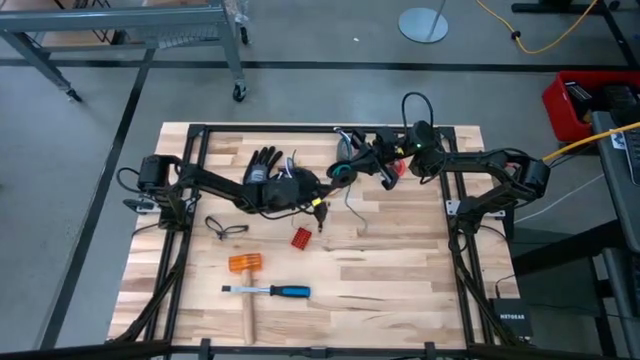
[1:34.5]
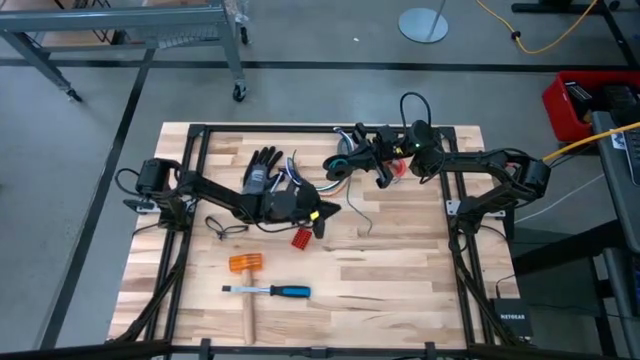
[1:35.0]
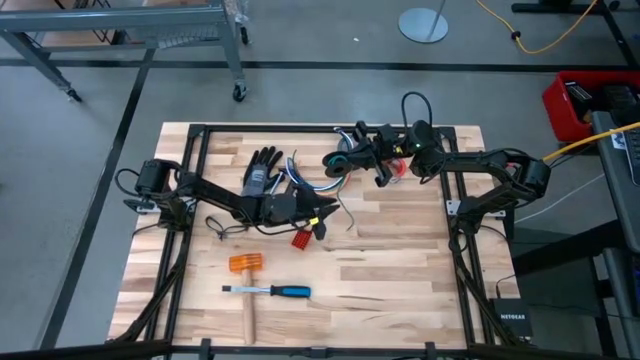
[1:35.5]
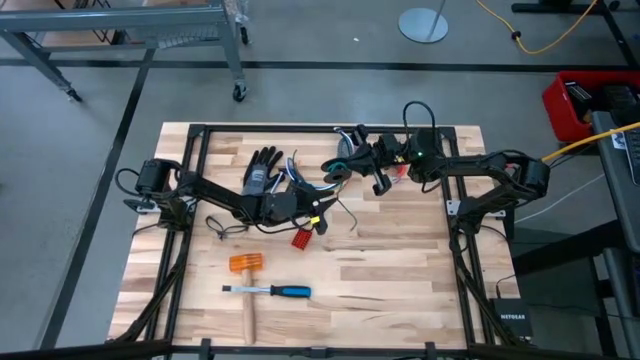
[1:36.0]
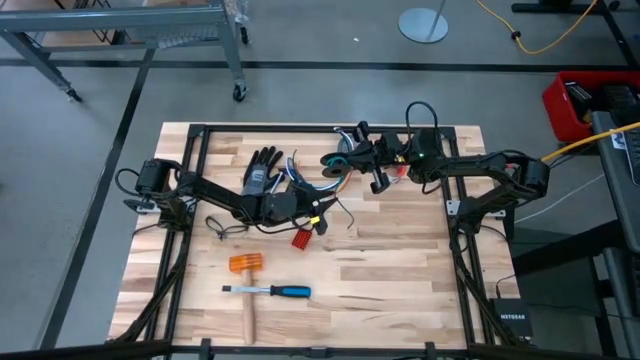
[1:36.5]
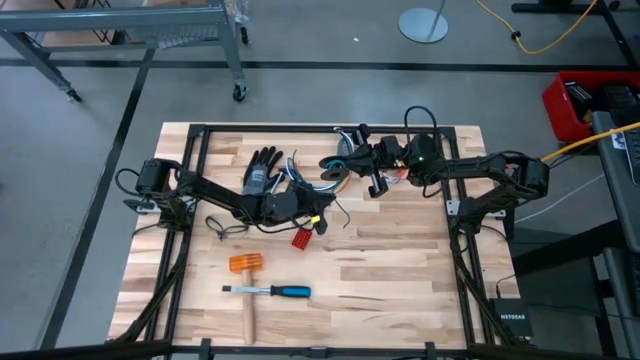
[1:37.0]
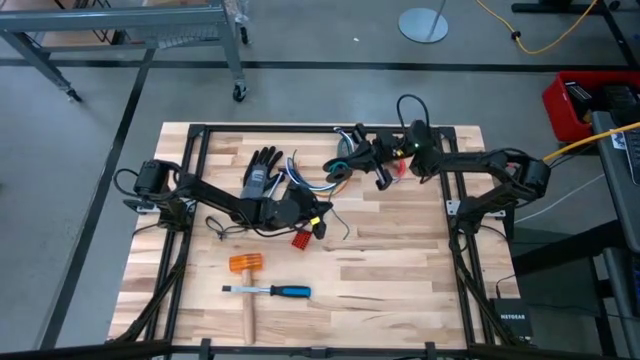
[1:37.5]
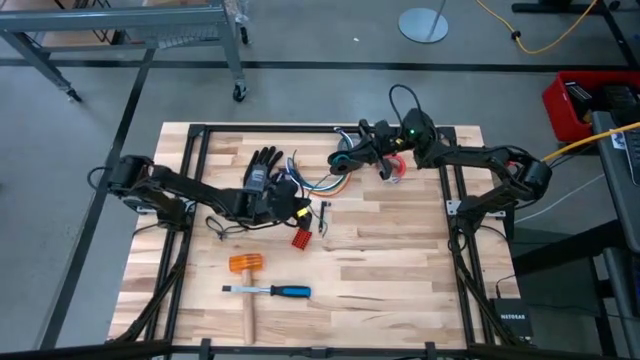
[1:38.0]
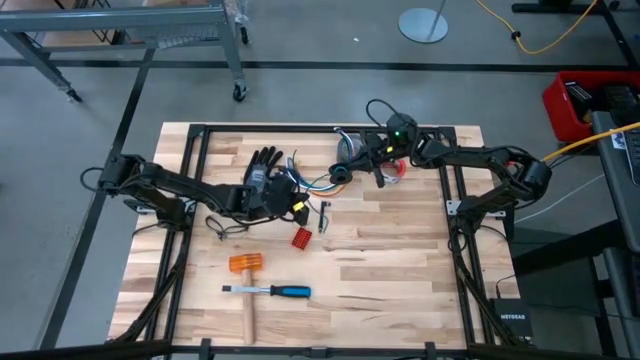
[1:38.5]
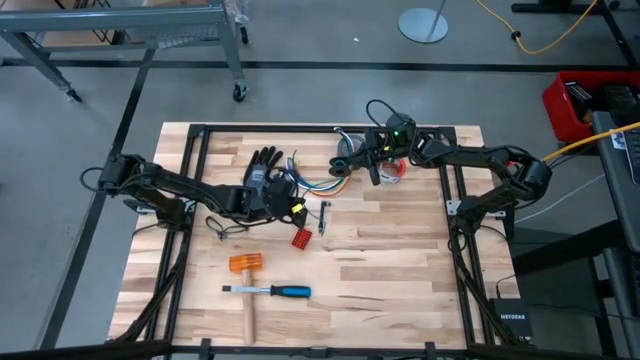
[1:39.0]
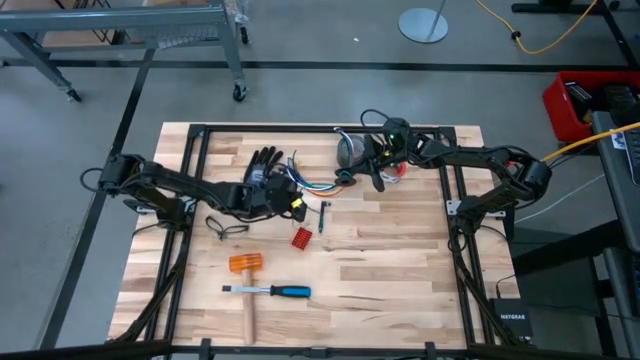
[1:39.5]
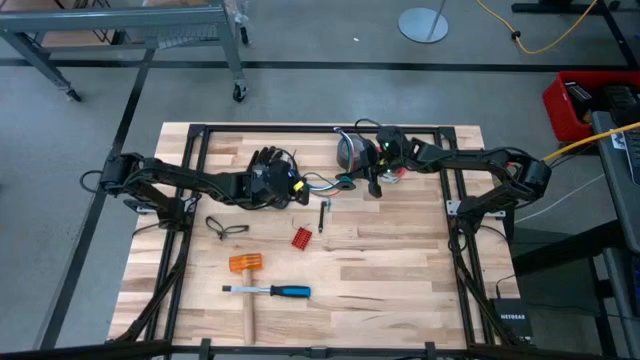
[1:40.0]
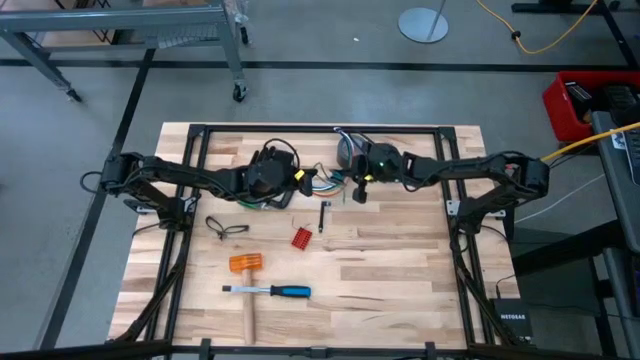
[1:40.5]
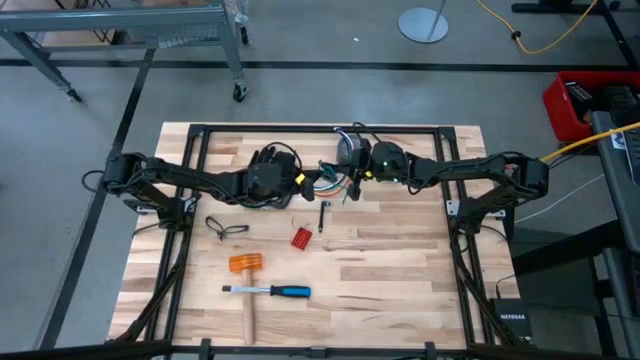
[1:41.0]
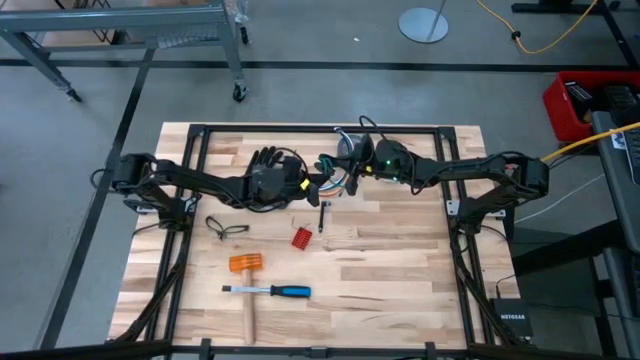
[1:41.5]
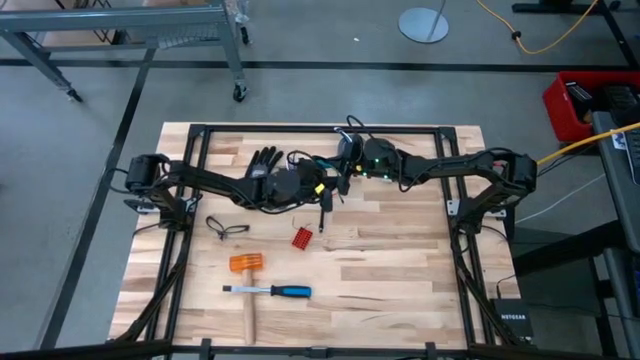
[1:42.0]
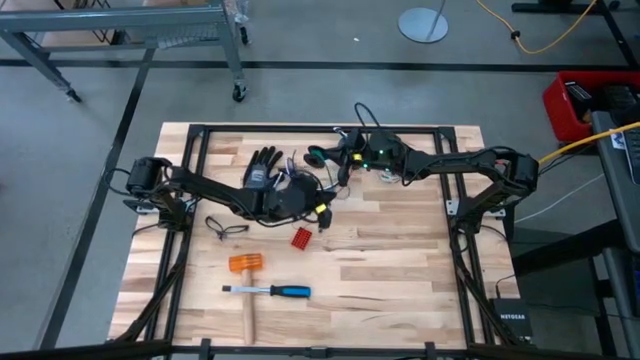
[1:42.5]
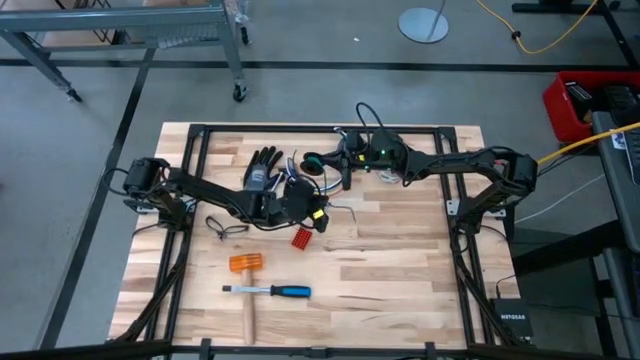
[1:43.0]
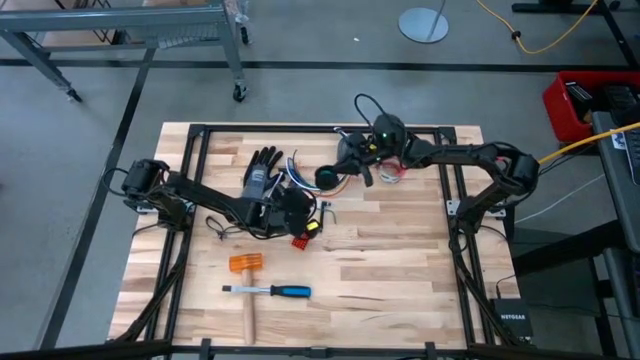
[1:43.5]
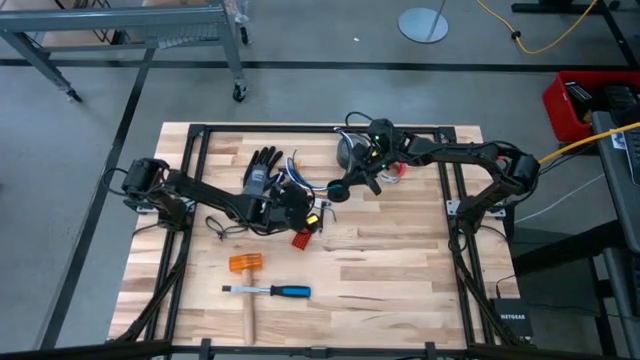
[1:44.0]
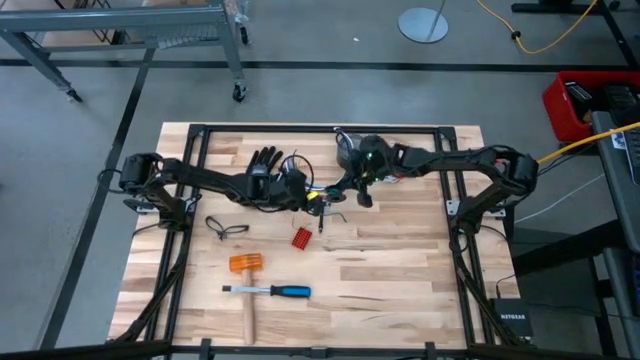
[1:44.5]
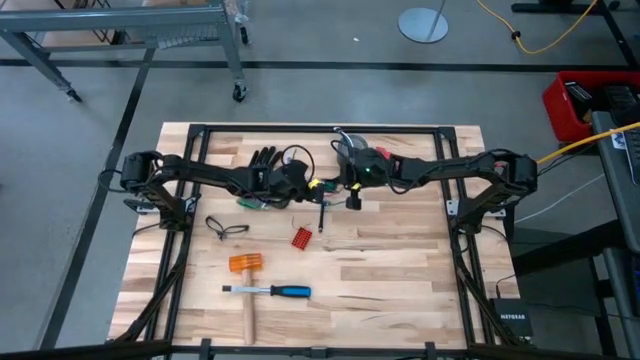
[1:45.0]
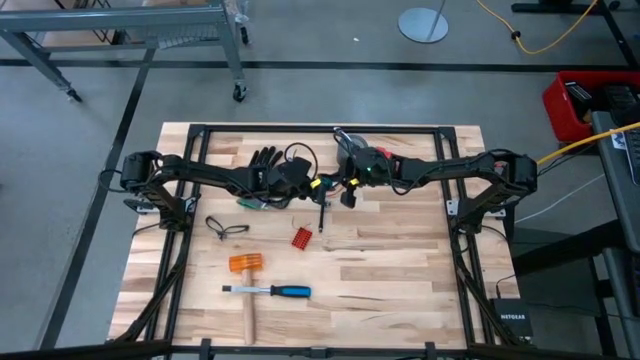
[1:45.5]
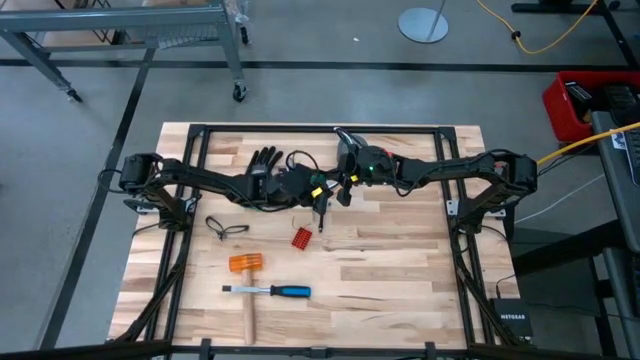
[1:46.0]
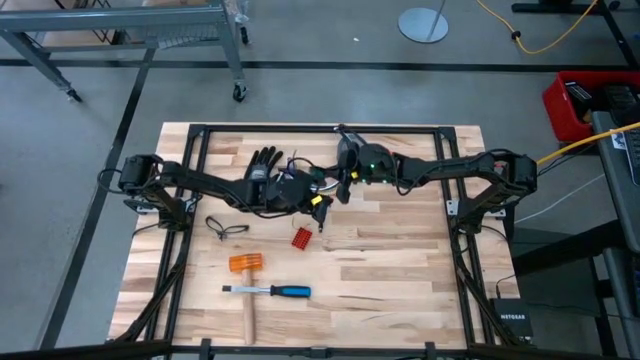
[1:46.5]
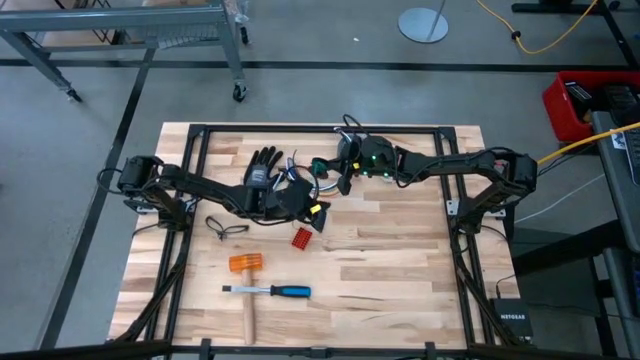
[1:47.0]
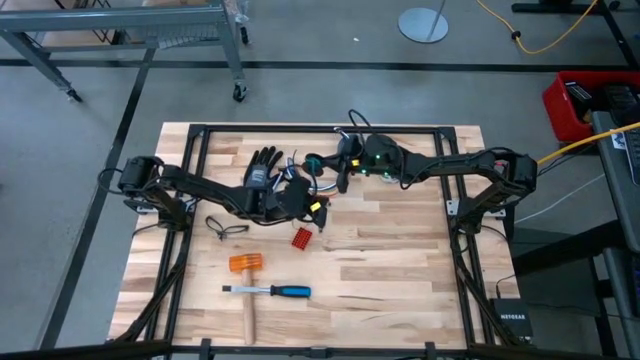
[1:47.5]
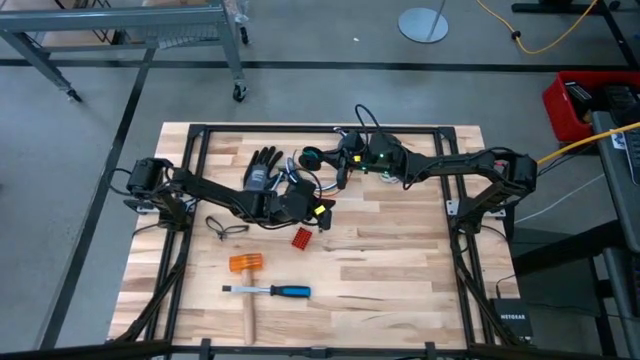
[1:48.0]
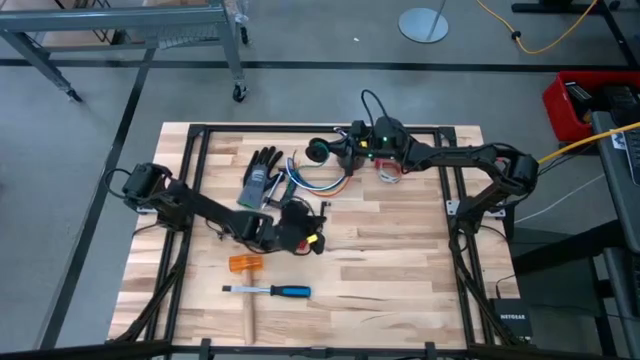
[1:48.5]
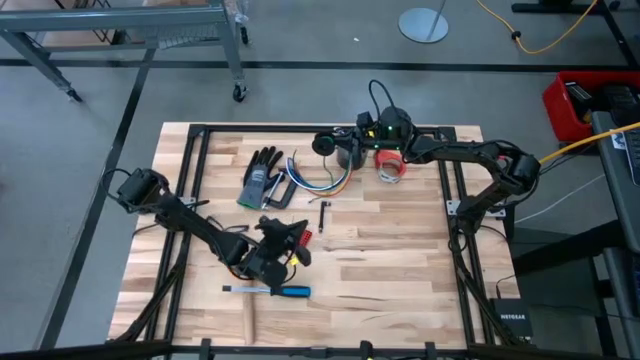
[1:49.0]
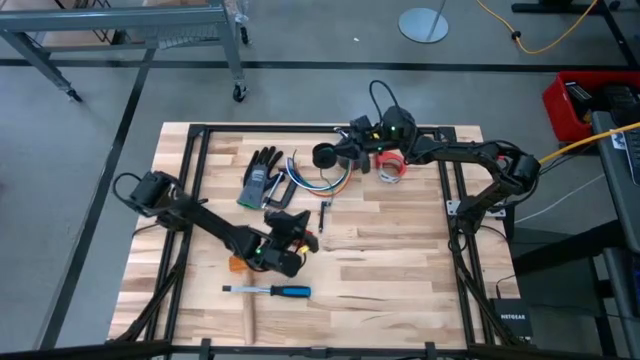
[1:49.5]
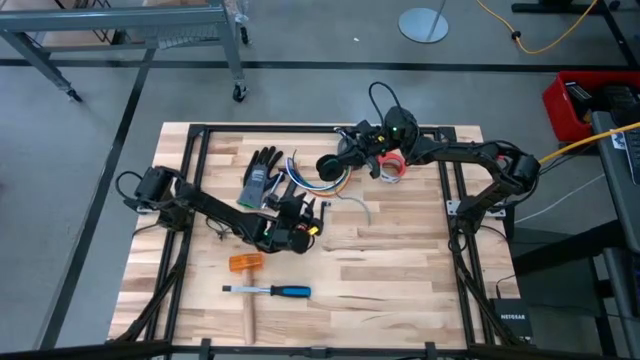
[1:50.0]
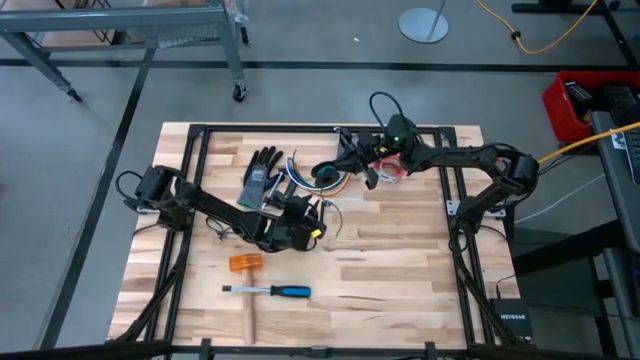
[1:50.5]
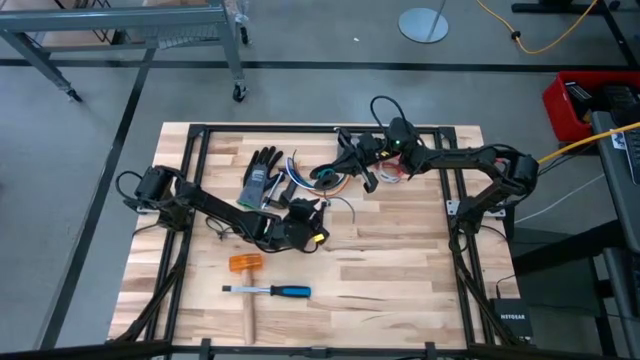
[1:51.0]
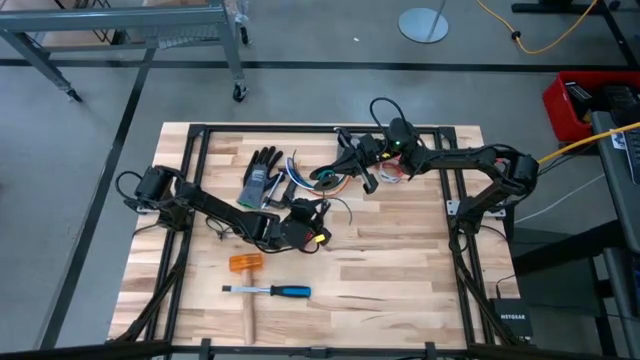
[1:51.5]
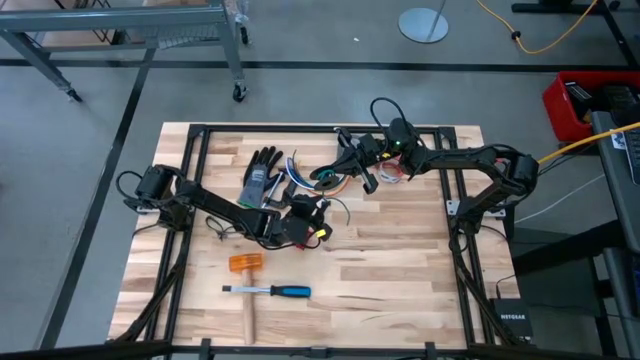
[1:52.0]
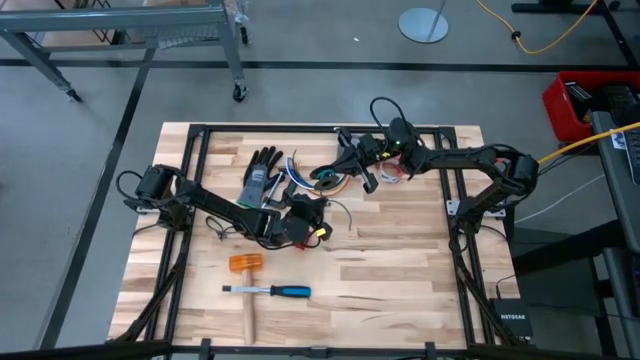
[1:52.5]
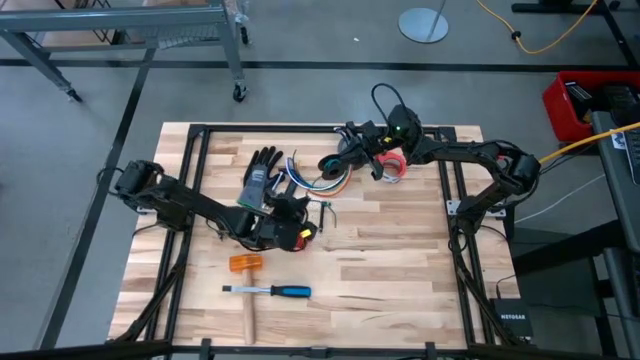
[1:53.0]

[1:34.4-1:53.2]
Task: Coil cords
Coil the green wire into the black spool

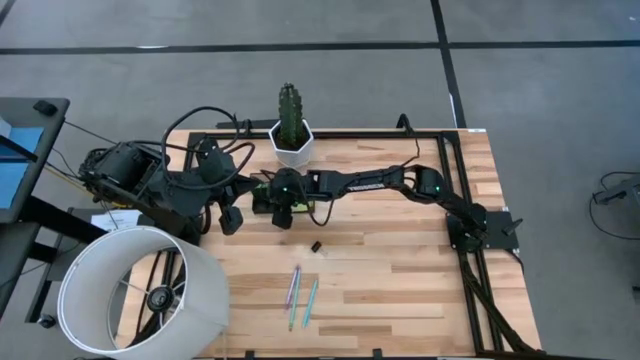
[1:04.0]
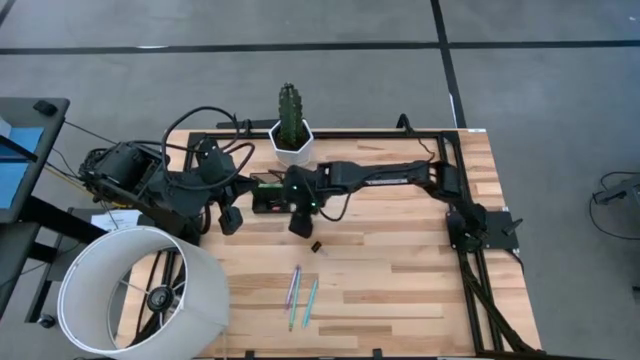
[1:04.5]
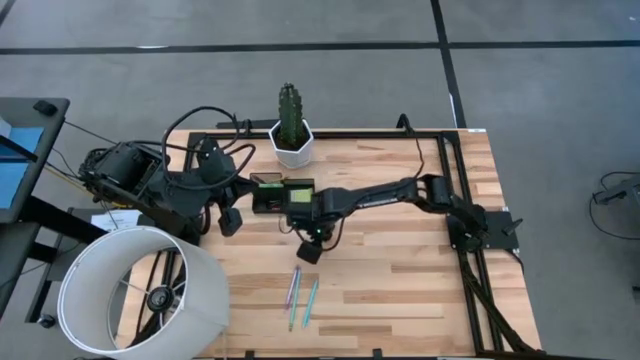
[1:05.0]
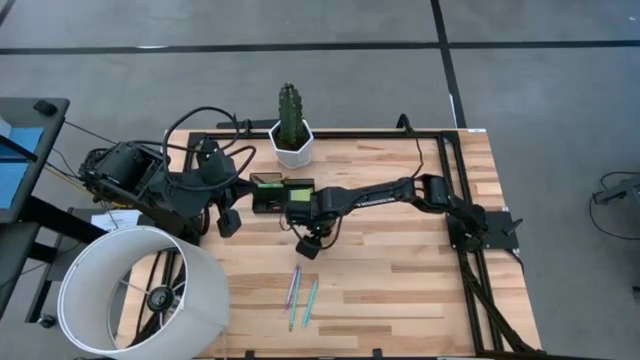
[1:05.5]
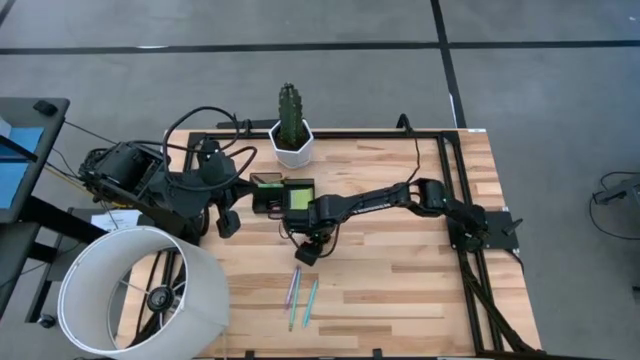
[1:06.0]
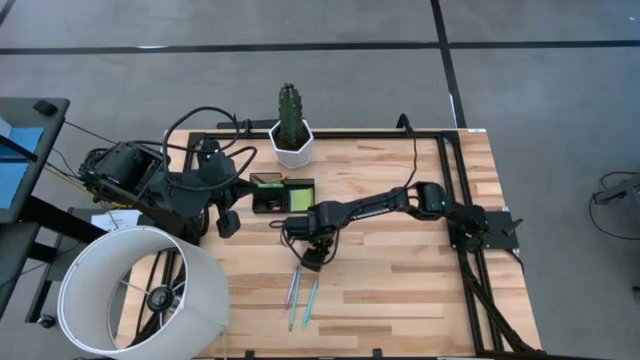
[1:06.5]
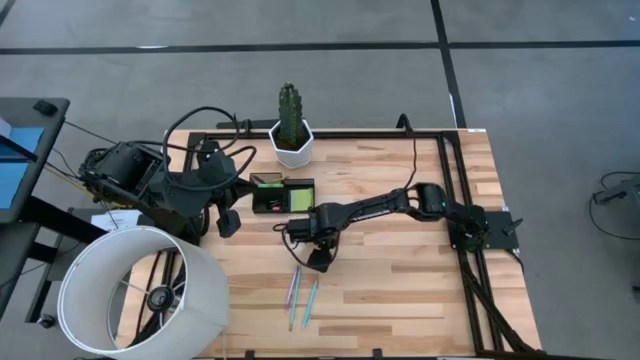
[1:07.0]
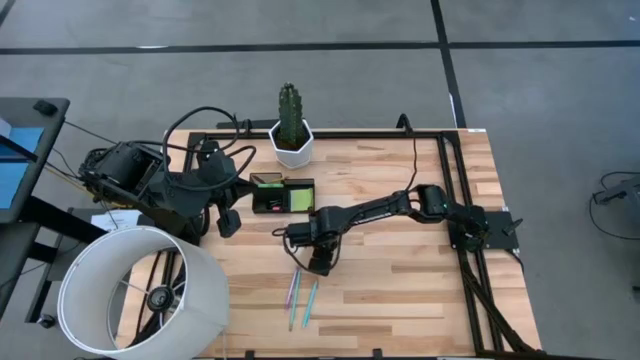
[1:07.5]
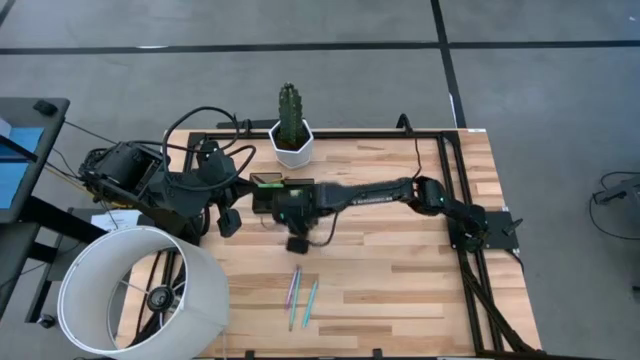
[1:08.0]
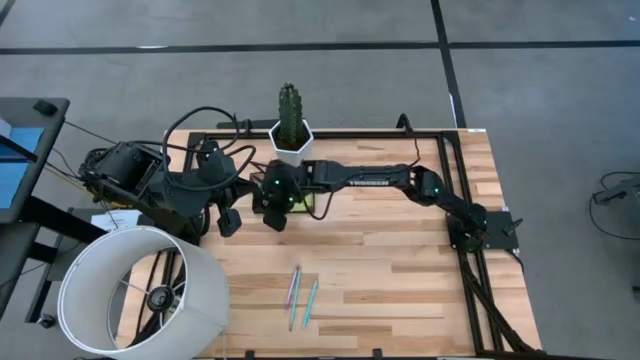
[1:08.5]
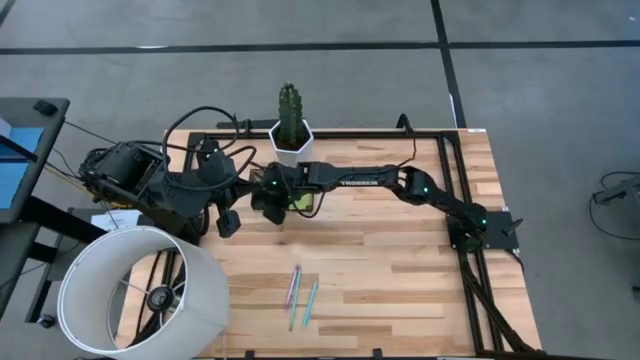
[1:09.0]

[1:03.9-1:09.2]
Task: Pick and place office supplies into organizer
Put the black binder clip into the black mesh organizer
